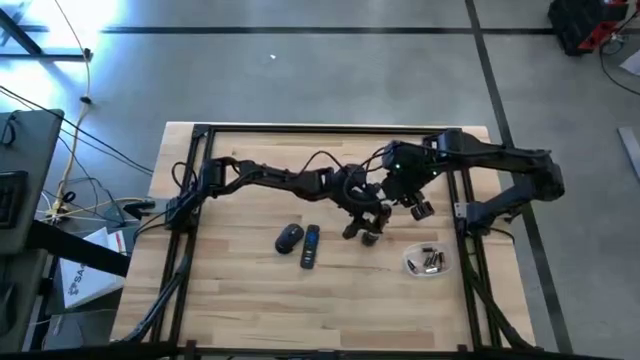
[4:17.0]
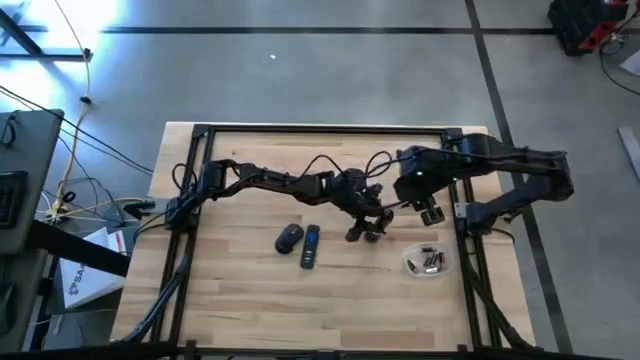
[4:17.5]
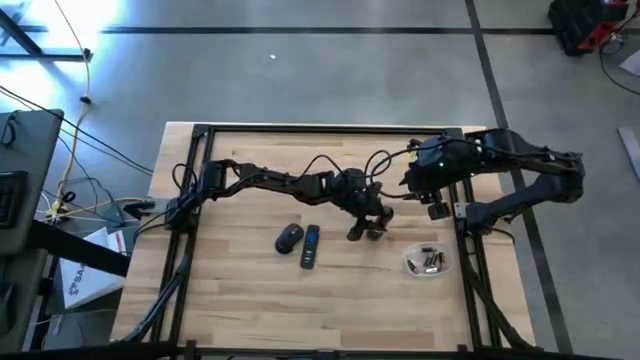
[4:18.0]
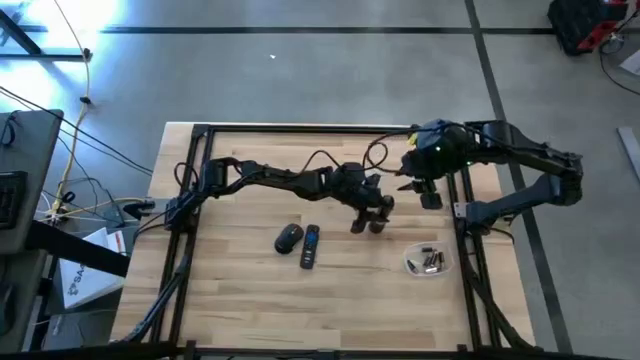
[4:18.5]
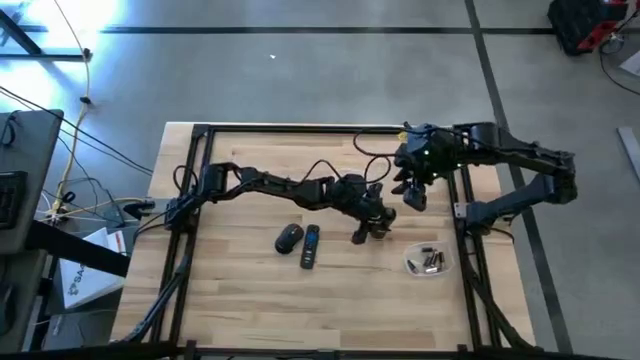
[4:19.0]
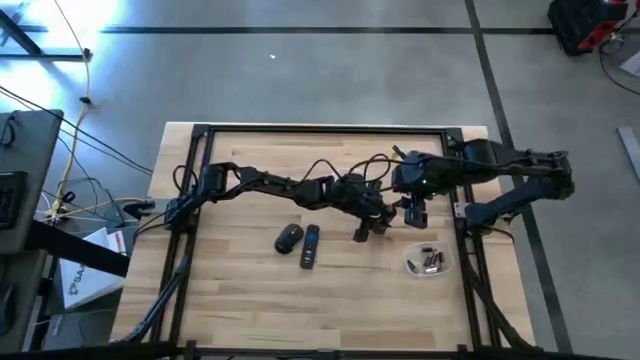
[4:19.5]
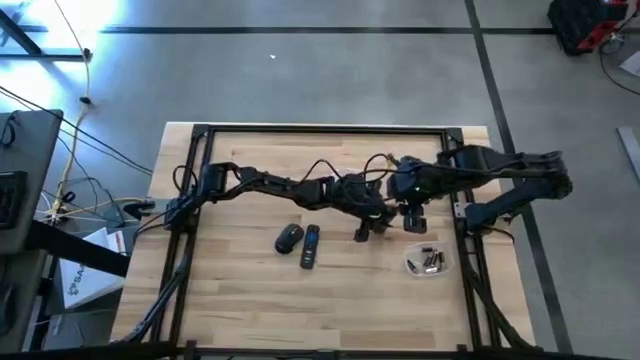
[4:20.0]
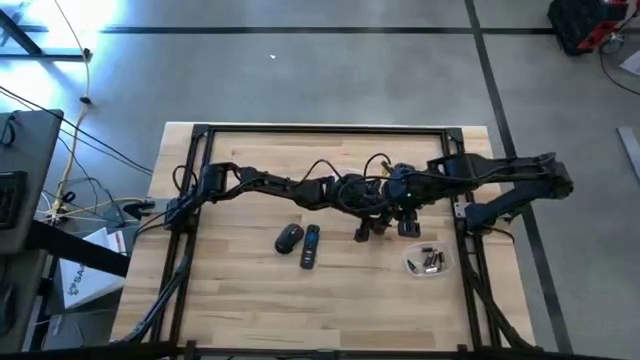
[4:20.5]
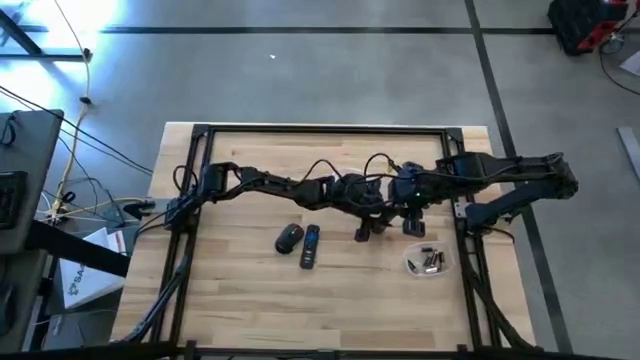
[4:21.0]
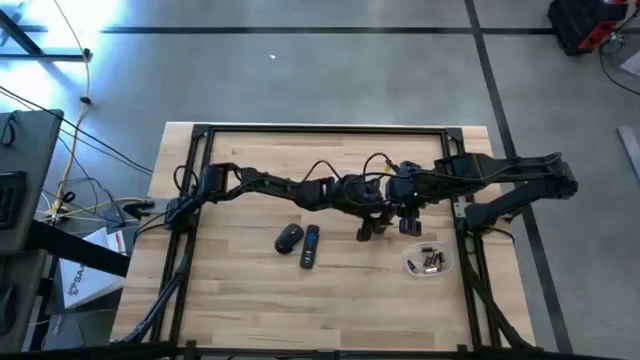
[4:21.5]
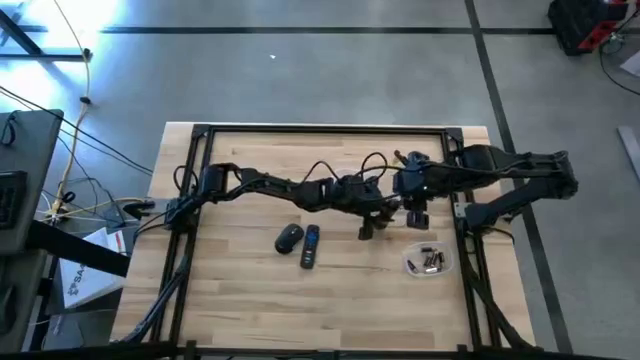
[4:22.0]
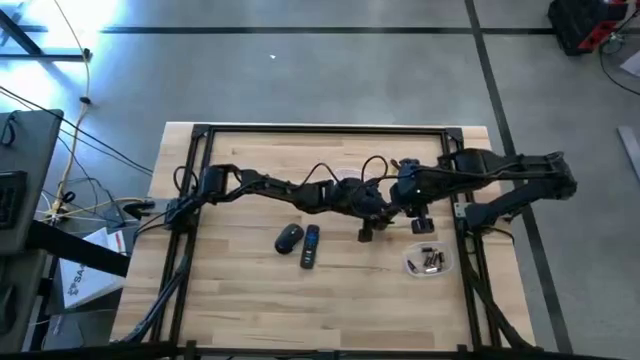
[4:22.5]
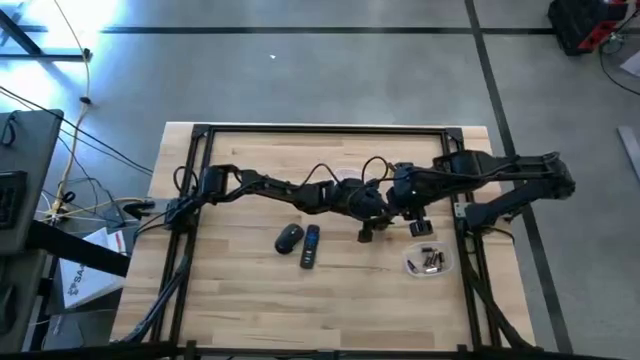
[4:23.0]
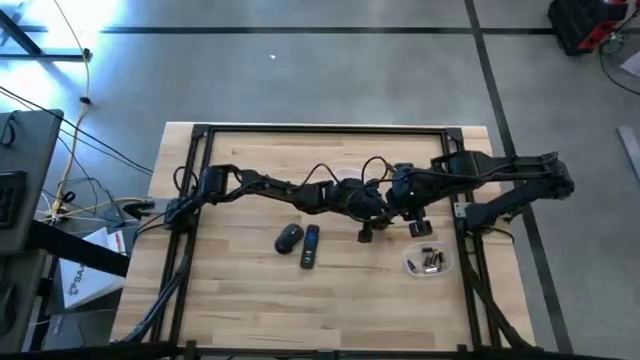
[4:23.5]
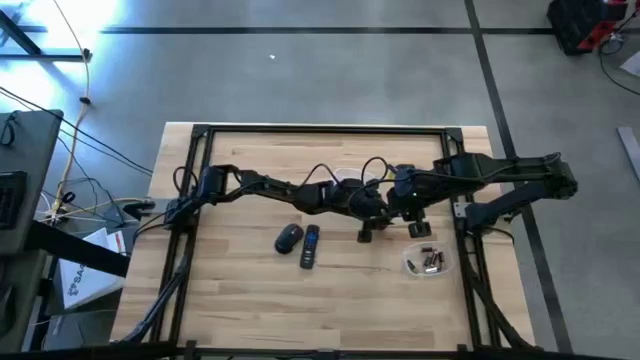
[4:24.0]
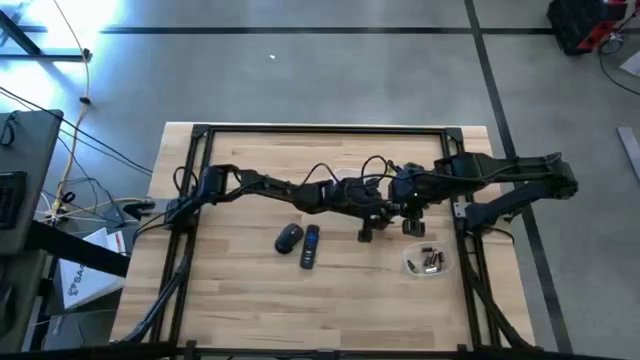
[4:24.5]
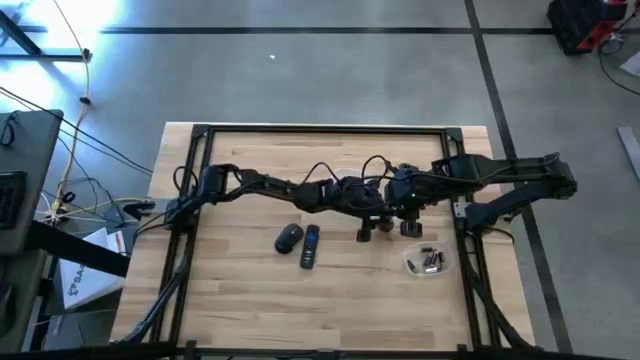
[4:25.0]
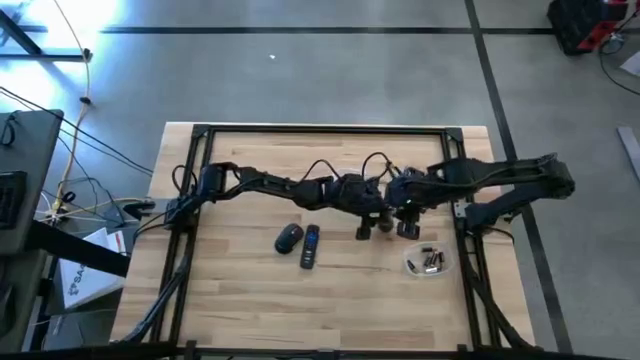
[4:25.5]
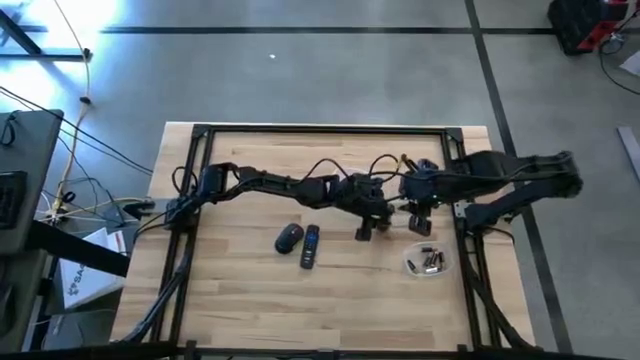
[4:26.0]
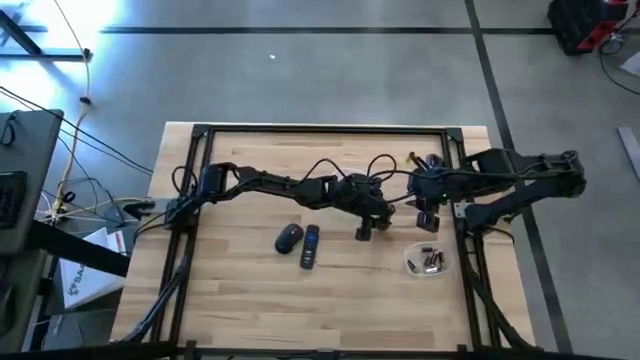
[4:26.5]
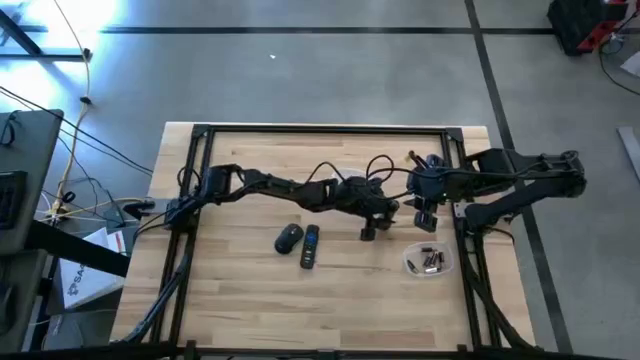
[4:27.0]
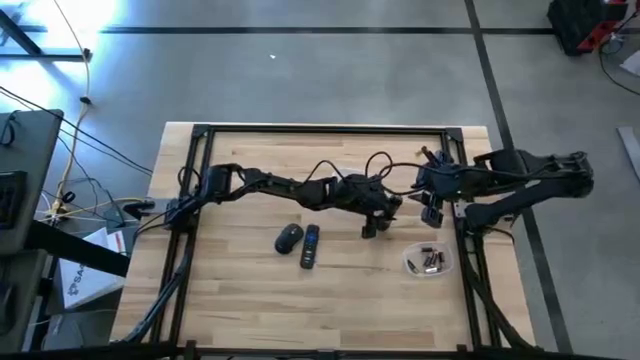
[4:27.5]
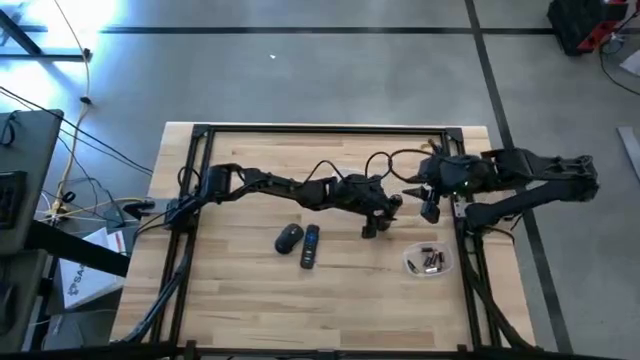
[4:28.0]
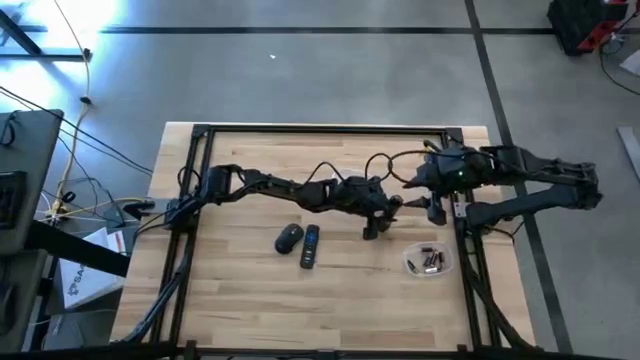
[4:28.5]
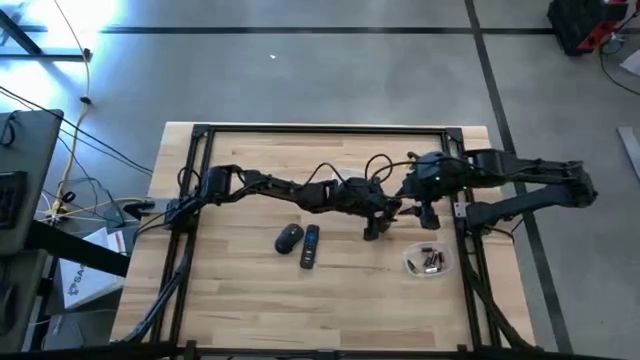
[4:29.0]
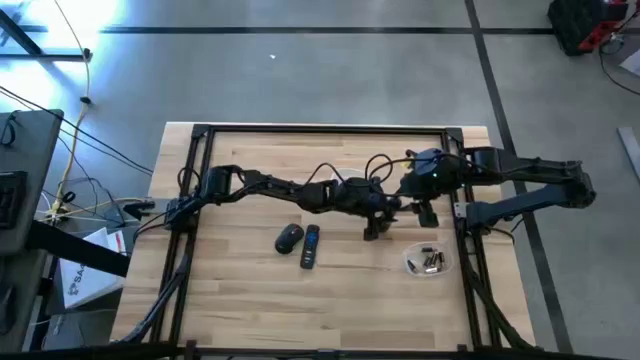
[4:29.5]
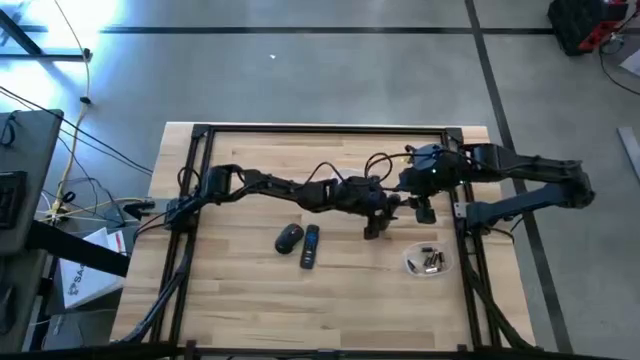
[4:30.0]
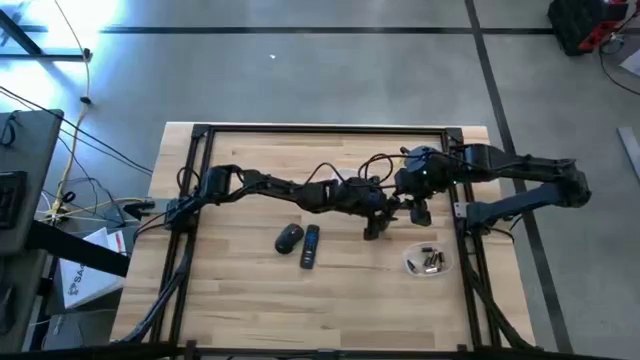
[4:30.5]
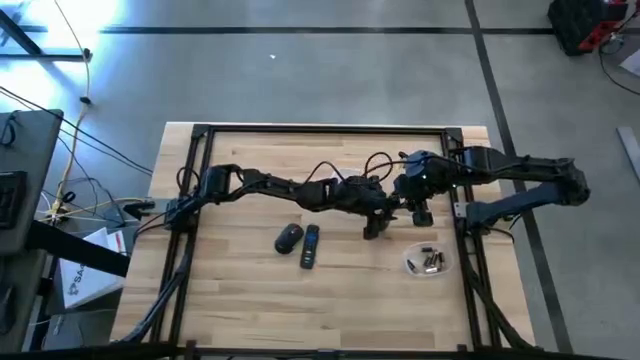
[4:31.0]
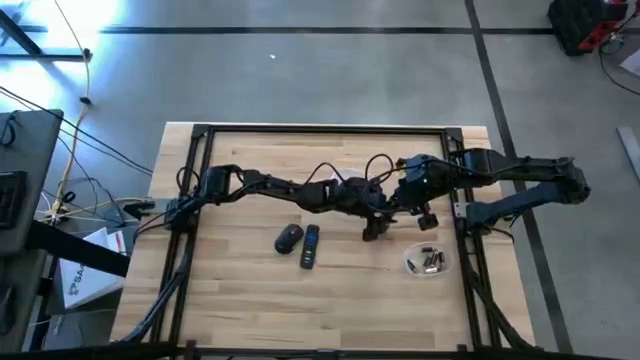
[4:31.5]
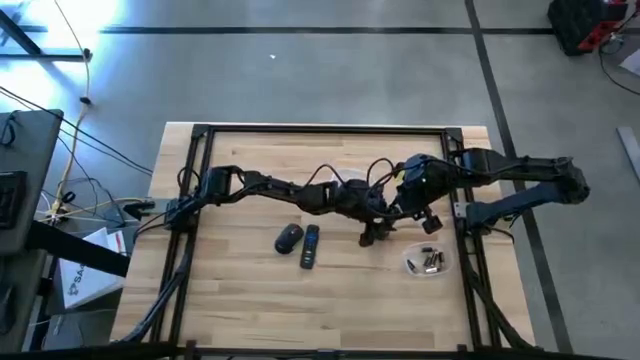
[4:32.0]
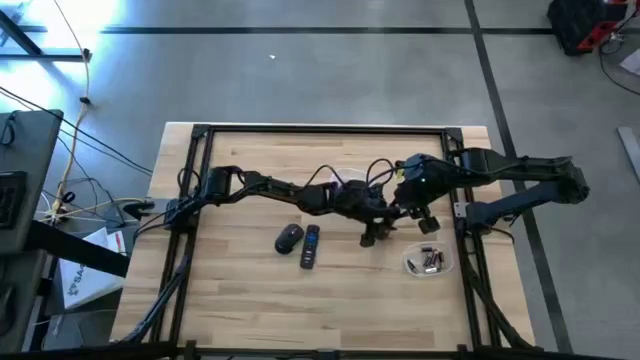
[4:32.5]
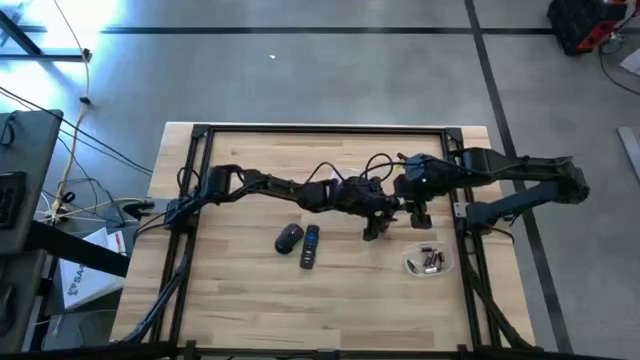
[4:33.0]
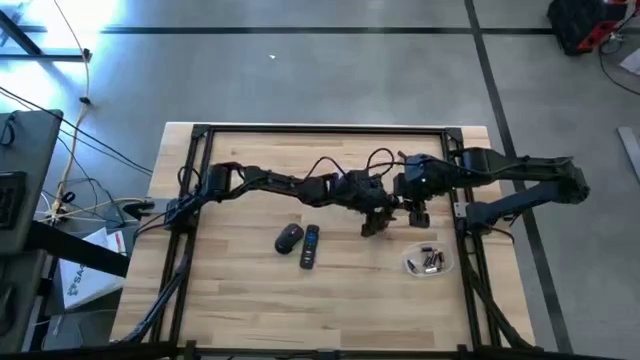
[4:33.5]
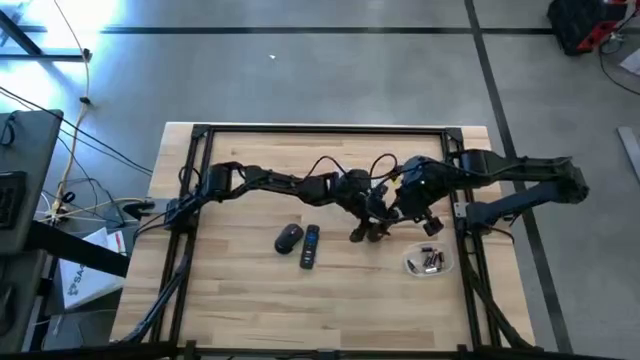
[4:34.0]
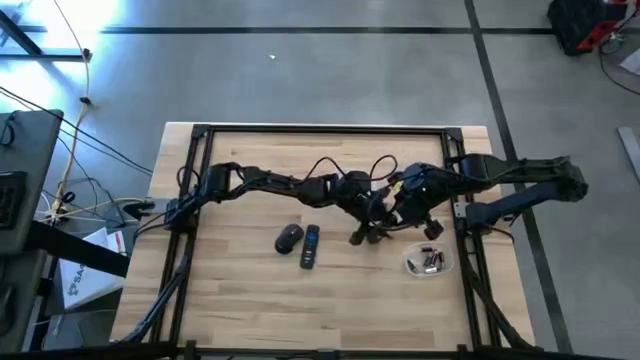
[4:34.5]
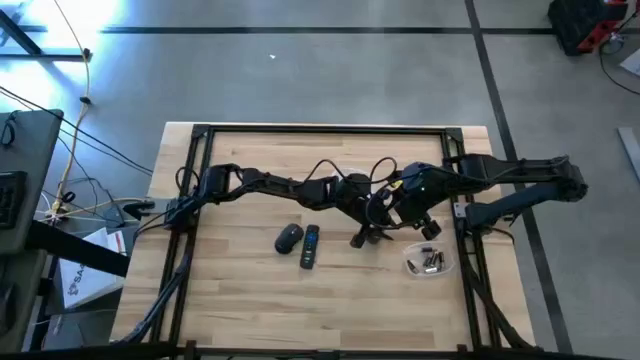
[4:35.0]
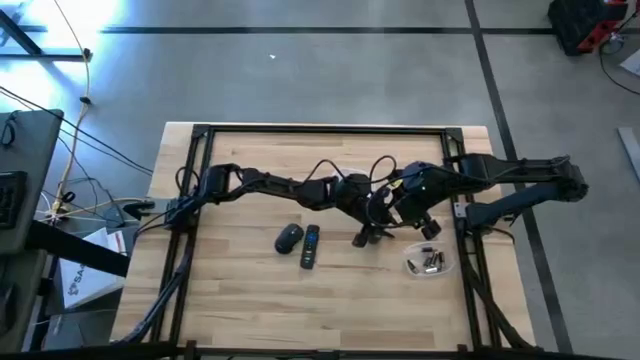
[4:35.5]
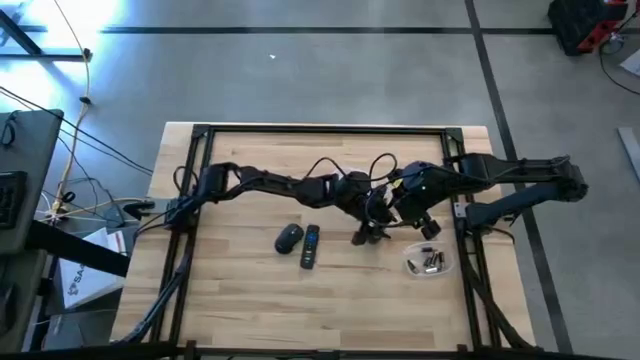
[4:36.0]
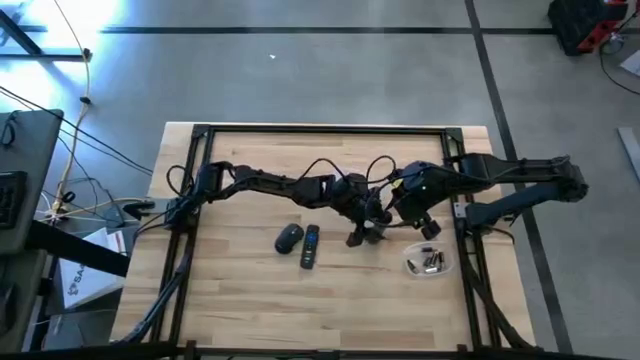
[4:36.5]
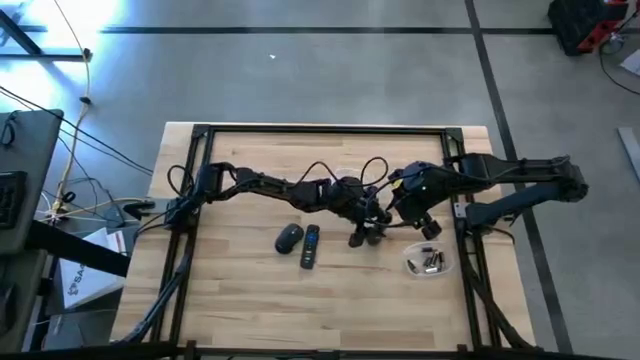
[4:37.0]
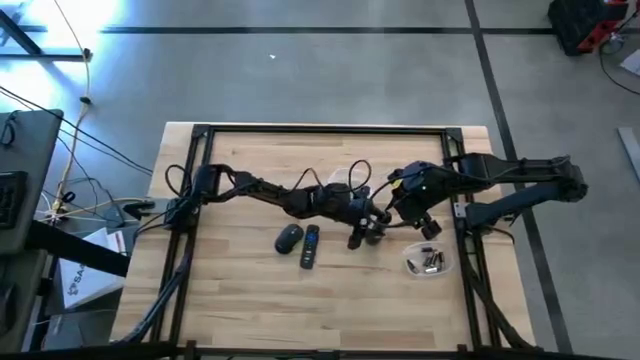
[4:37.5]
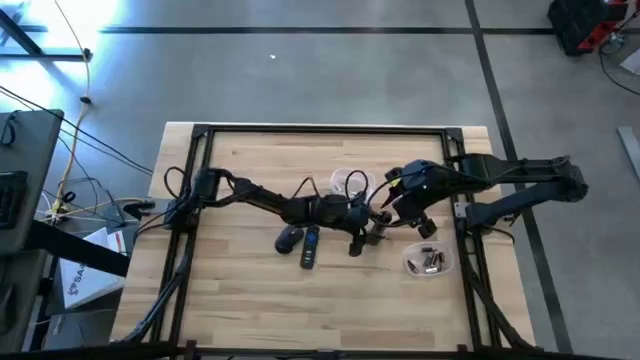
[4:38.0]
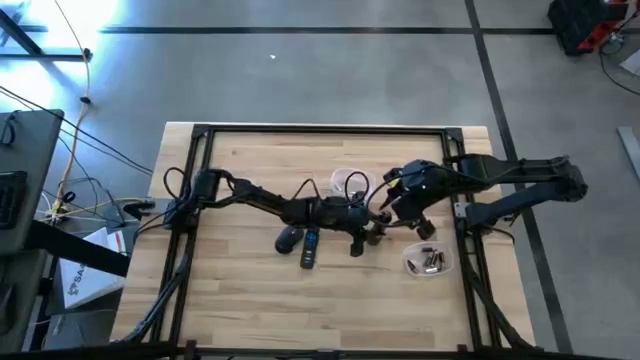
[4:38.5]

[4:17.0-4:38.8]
Task: Insert battery
Close the flashlight battery compartment
